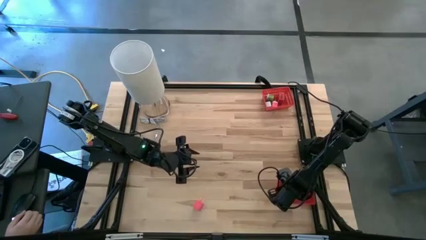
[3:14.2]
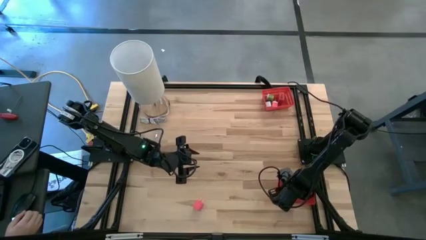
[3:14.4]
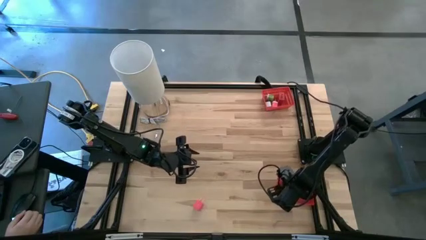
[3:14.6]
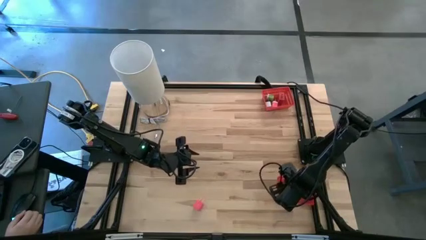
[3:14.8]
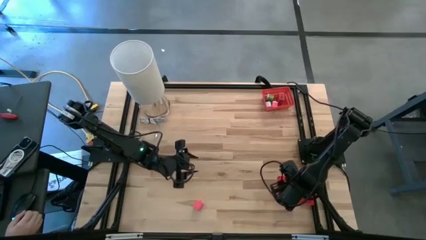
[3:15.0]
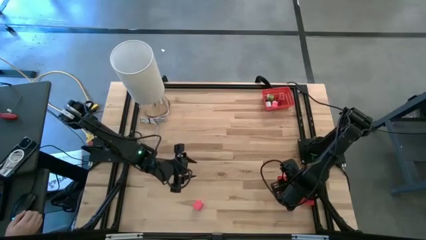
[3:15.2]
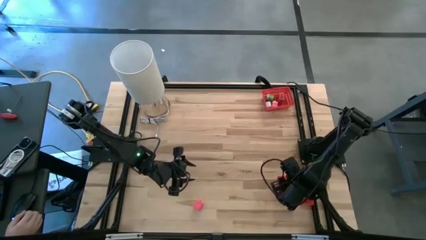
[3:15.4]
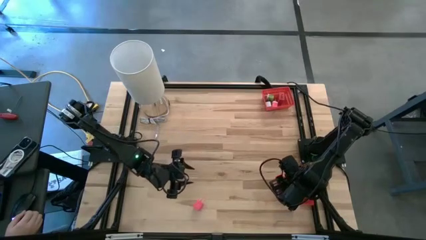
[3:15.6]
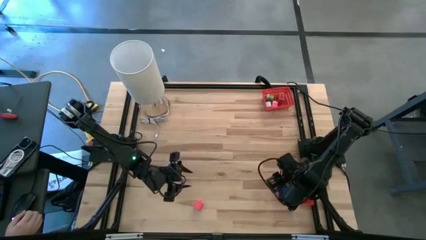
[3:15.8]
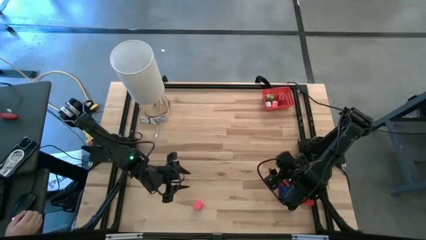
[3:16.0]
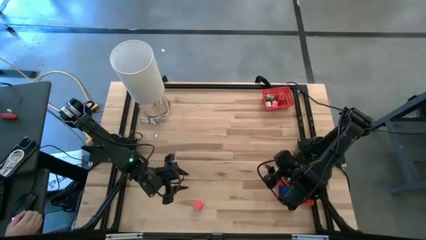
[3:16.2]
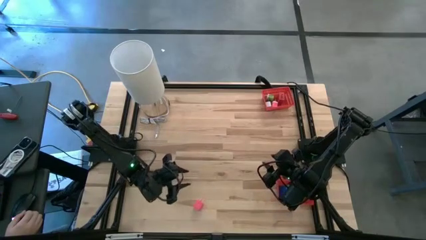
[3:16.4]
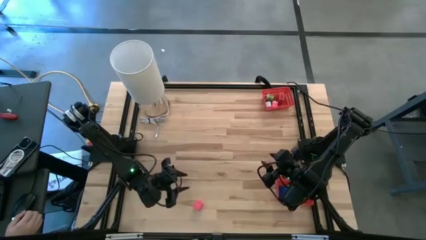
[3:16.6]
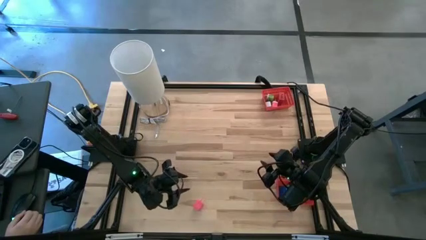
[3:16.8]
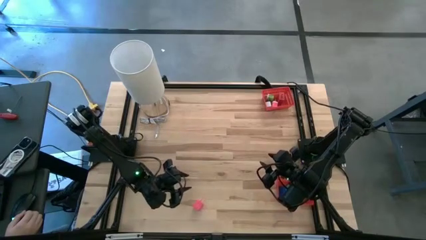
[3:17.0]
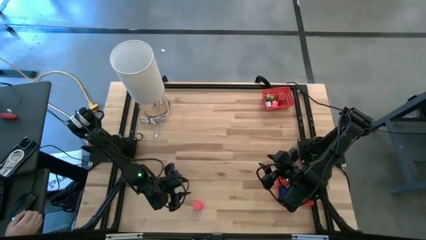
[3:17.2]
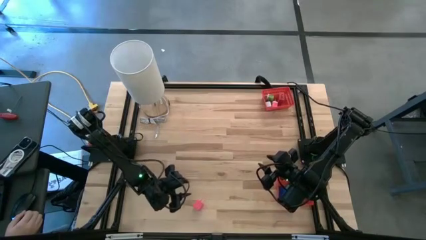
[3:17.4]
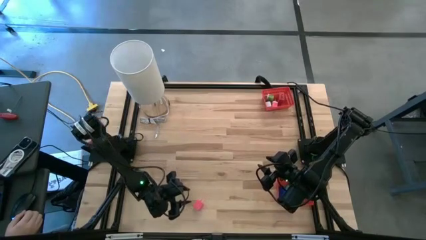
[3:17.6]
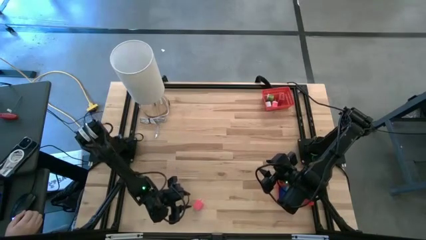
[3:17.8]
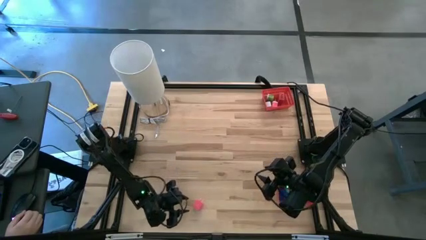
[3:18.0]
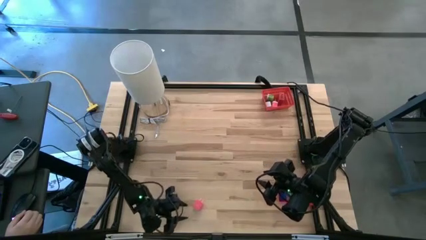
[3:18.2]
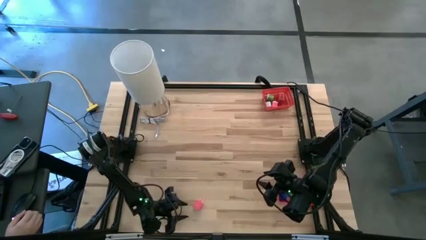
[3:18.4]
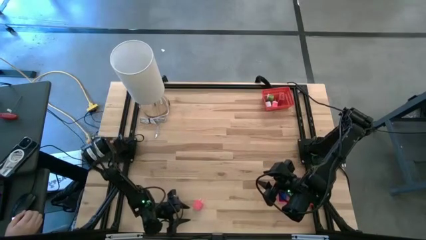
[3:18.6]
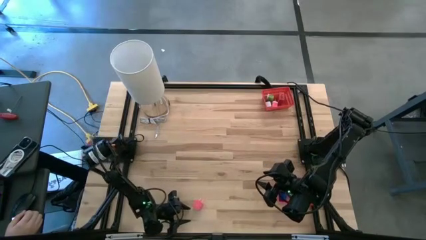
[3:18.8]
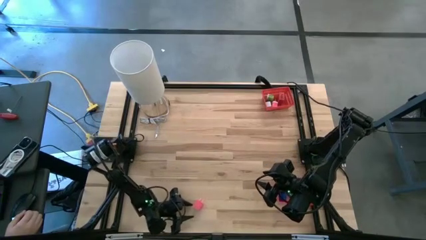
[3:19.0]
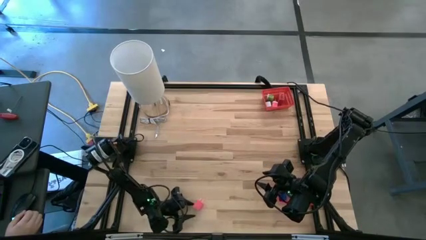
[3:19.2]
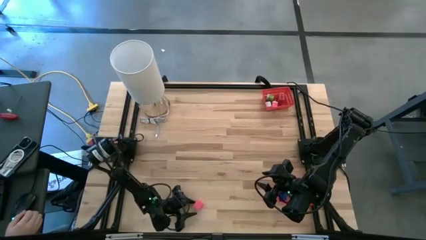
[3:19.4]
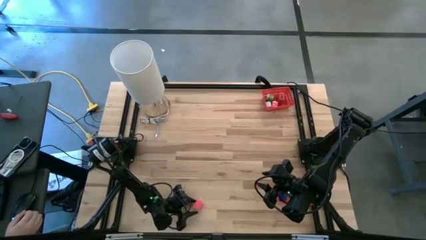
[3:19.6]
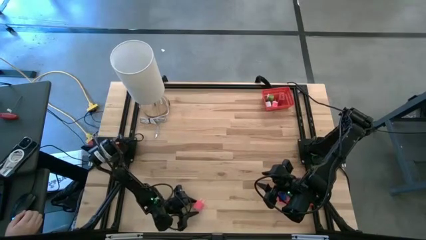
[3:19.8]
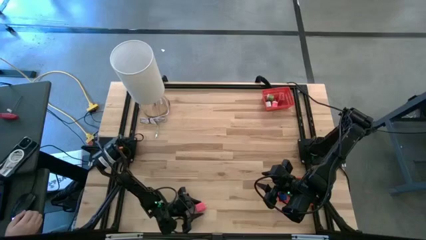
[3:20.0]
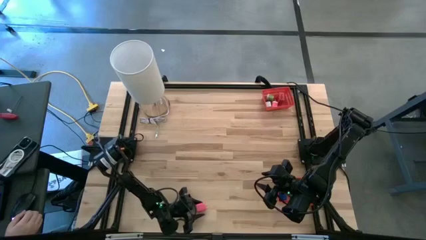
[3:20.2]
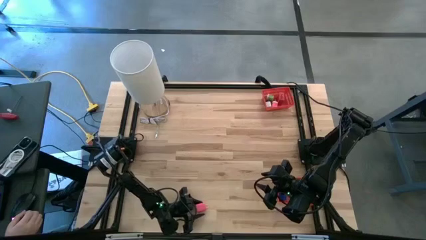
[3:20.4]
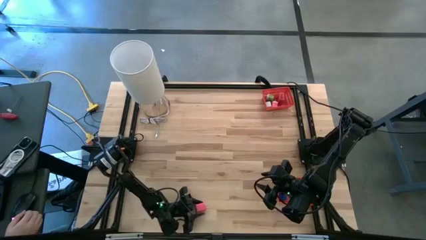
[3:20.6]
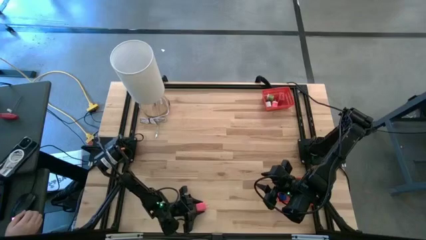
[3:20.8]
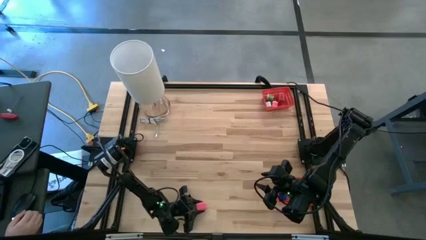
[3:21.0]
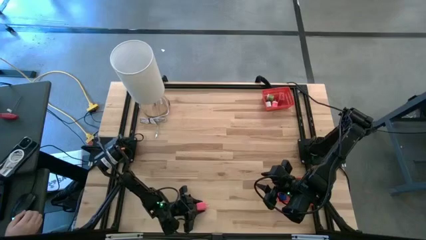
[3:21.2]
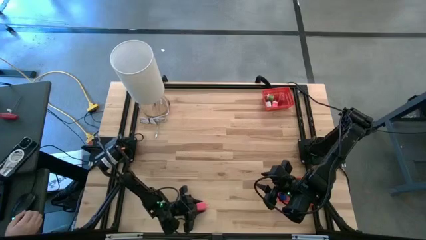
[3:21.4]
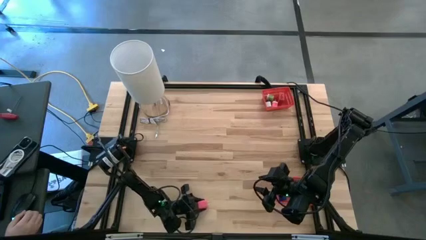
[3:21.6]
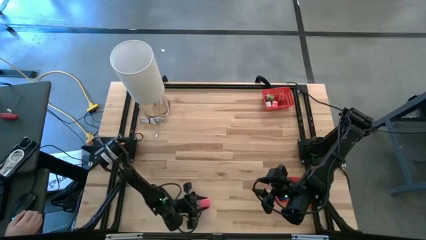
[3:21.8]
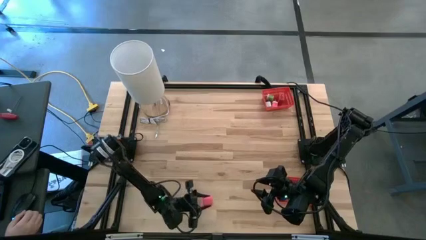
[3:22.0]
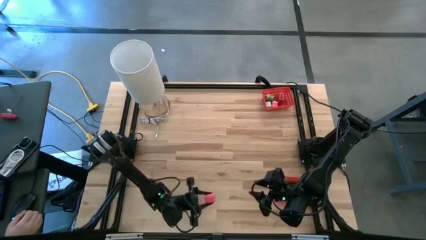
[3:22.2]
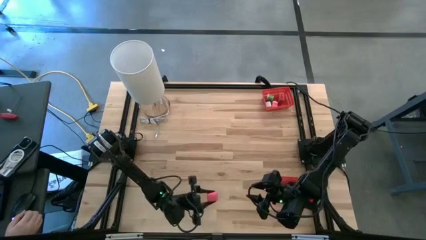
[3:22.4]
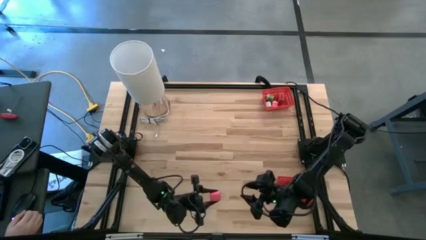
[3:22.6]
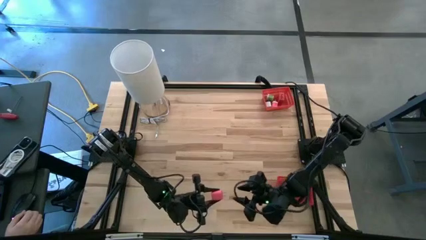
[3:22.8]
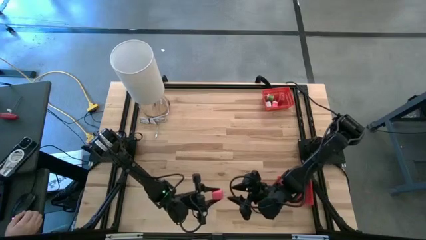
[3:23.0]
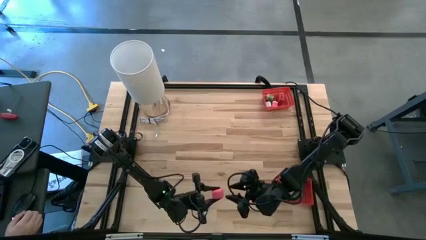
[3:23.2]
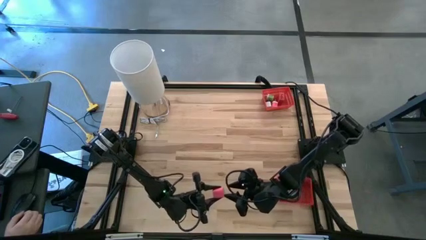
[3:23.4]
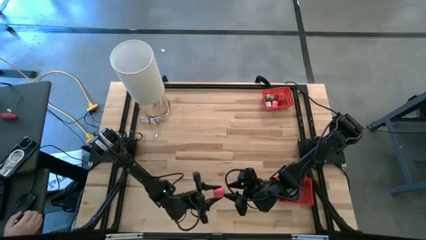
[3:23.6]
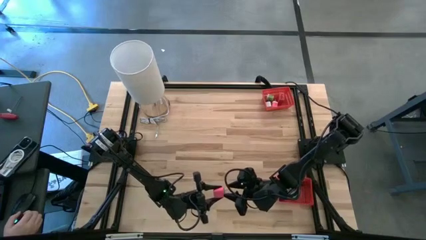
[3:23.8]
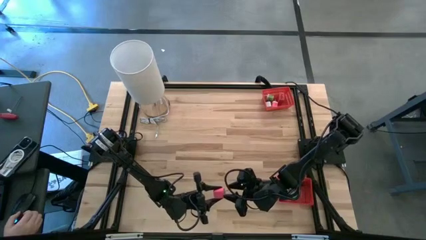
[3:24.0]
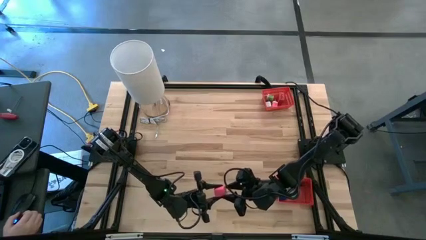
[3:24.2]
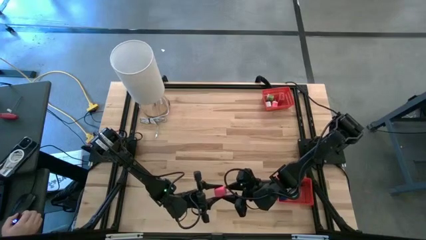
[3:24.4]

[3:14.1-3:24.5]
Task: Pick & Place Office items
Put the pink charger adapter into the top red basket

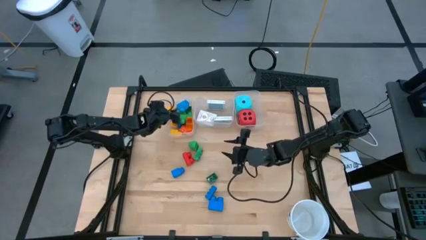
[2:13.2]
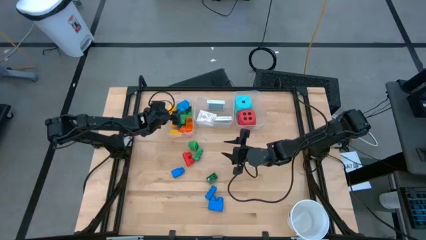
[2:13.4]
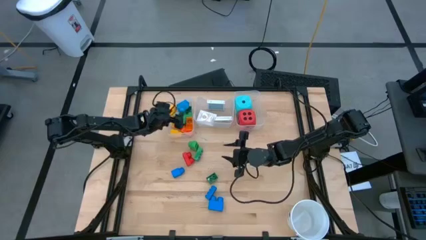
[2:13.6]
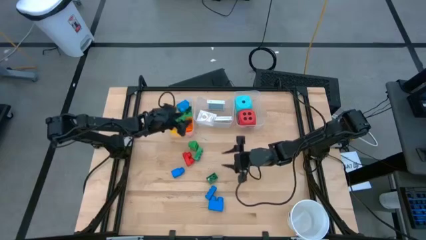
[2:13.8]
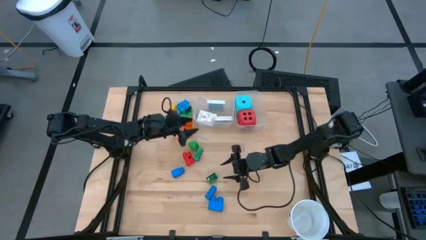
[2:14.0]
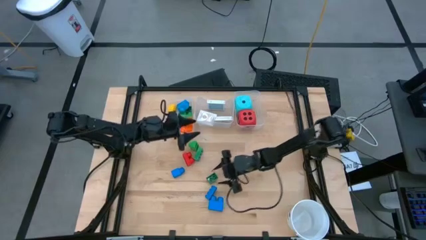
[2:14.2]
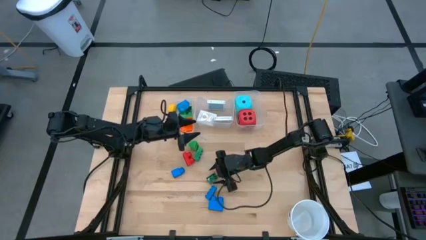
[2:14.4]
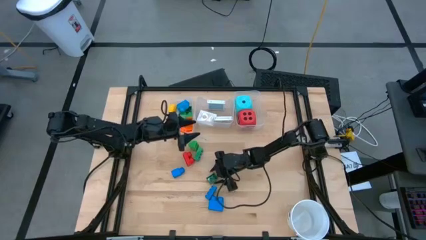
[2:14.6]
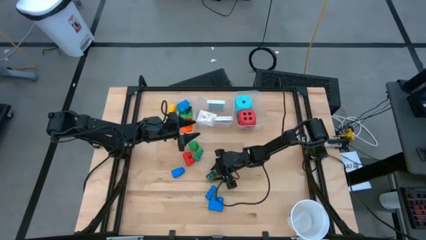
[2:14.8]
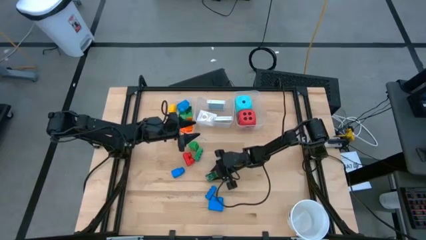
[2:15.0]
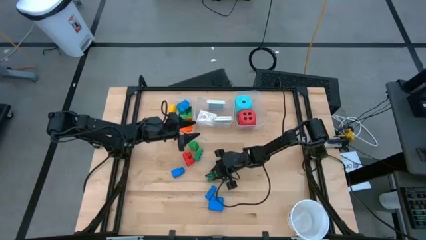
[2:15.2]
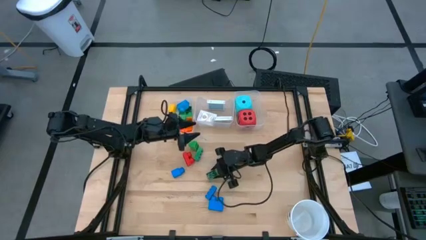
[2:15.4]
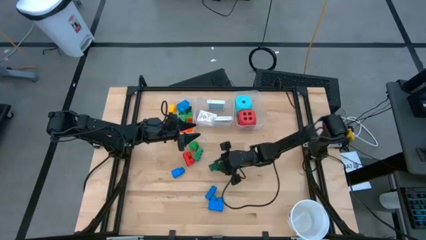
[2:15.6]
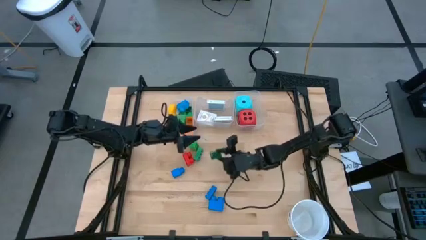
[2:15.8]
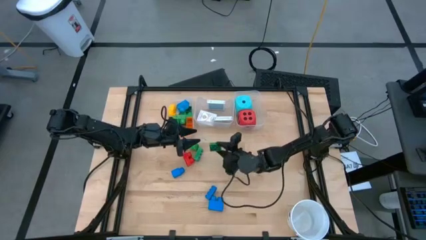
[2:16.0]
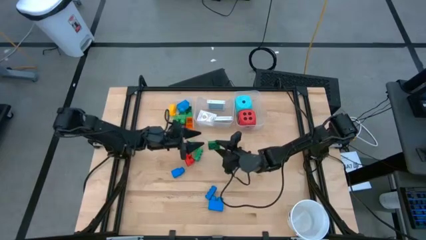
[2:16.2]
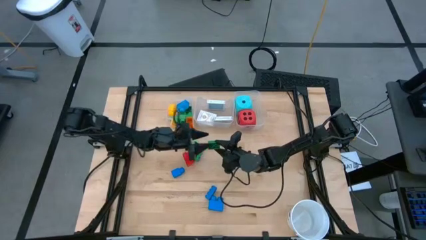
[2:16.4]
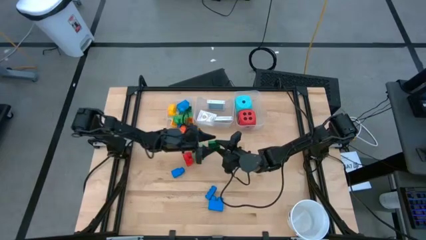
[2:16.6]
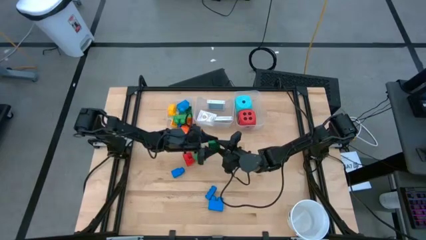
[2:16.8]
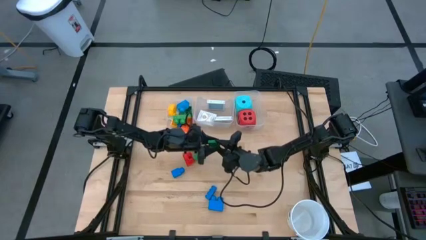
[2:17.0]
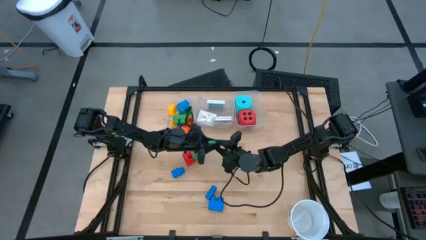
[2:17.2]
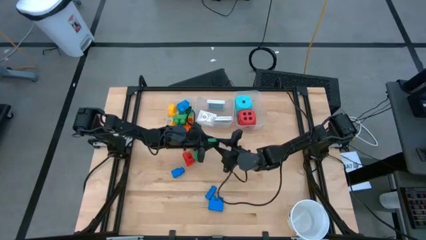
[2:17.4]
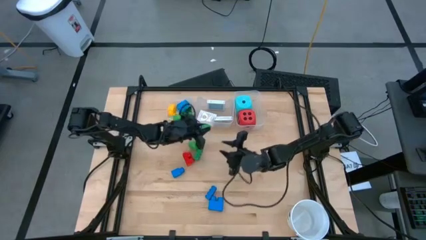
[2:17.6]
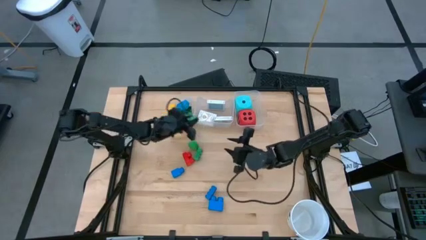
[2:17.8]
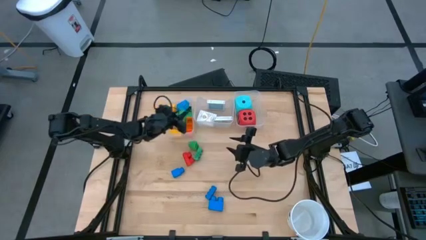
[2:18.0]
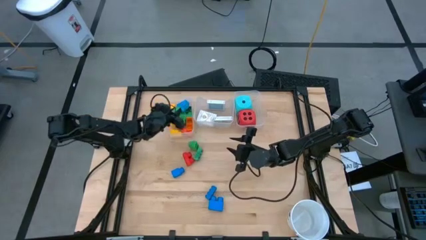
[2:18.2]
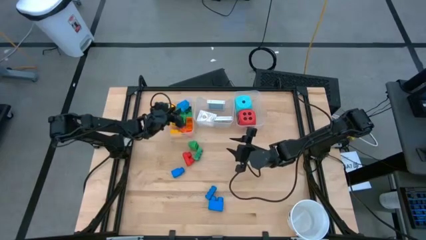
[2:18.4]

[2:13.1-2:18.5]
Task: Pick & Place Toys
Put the green game piece into the left transparent bin
